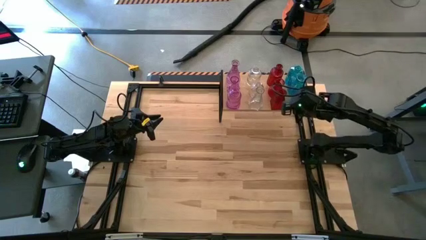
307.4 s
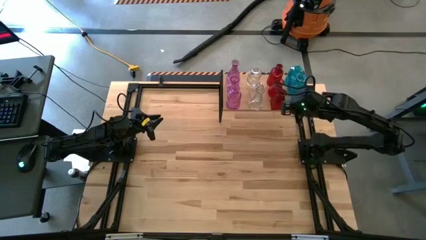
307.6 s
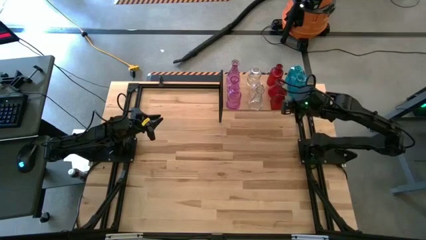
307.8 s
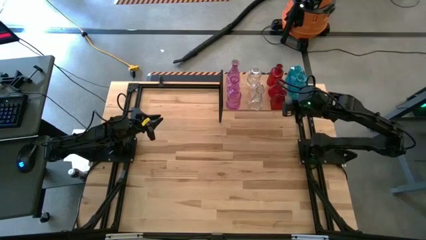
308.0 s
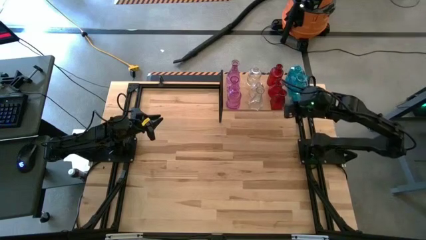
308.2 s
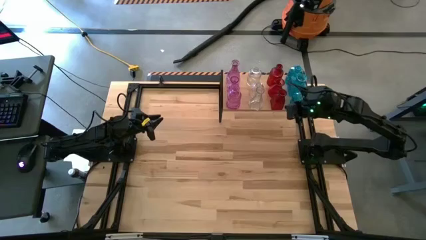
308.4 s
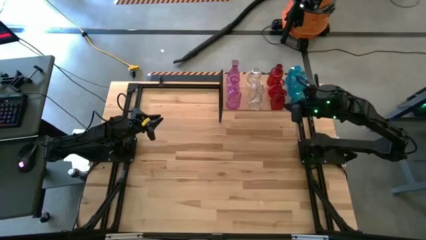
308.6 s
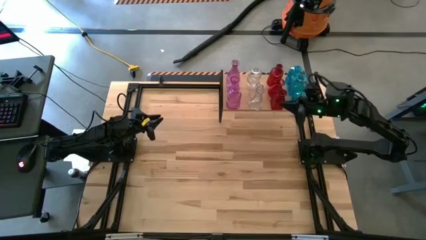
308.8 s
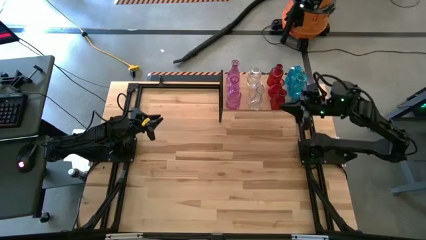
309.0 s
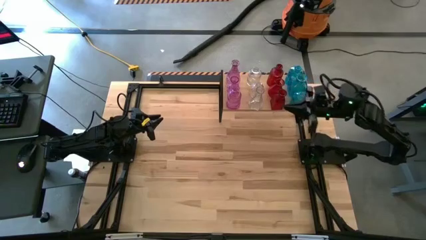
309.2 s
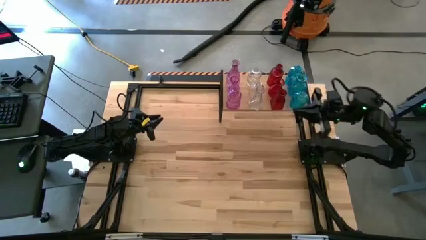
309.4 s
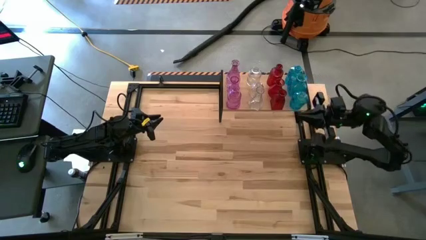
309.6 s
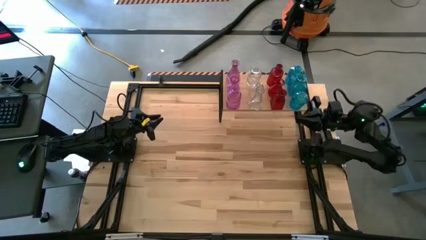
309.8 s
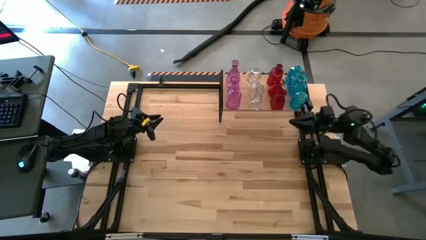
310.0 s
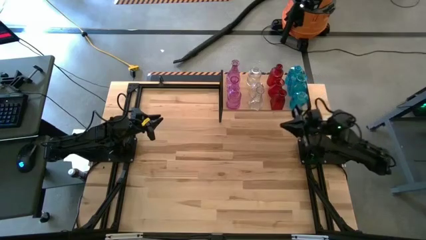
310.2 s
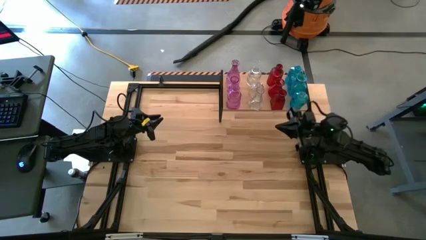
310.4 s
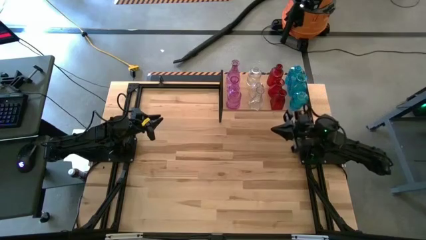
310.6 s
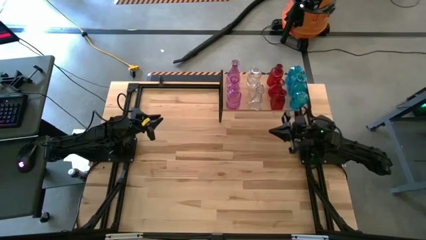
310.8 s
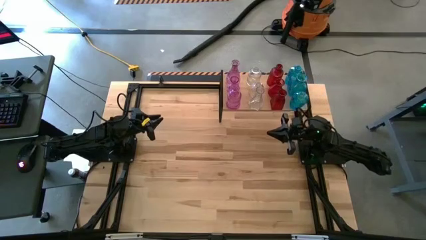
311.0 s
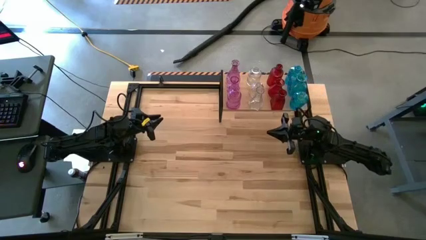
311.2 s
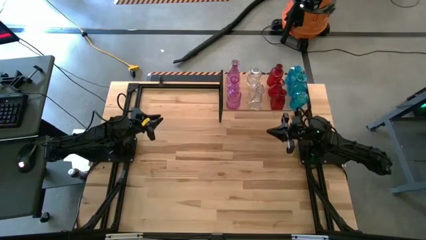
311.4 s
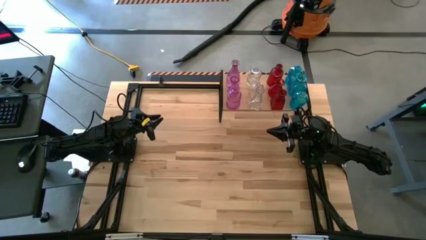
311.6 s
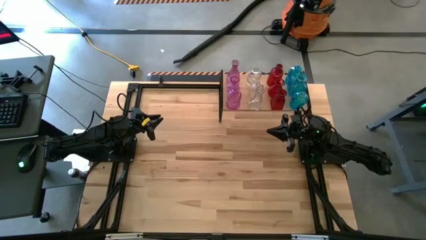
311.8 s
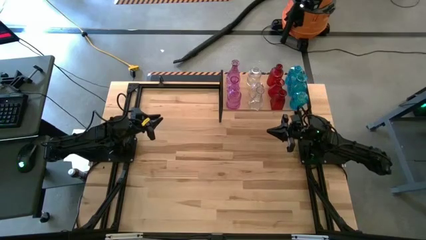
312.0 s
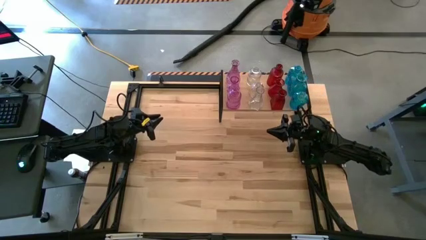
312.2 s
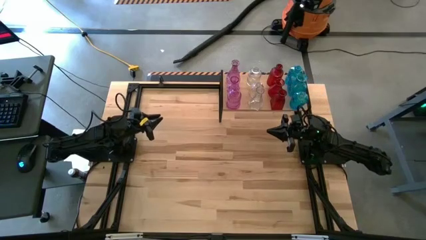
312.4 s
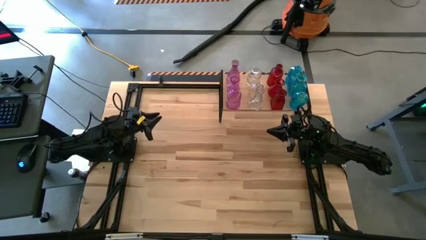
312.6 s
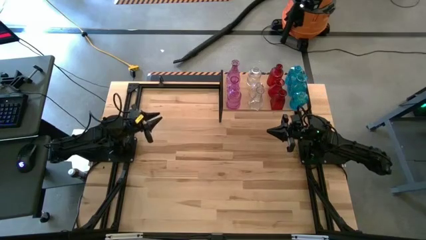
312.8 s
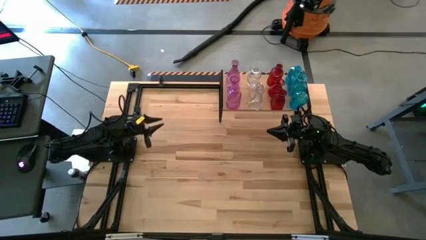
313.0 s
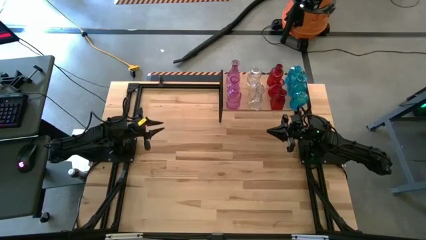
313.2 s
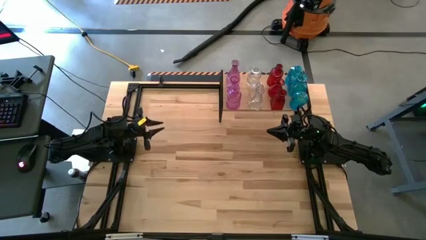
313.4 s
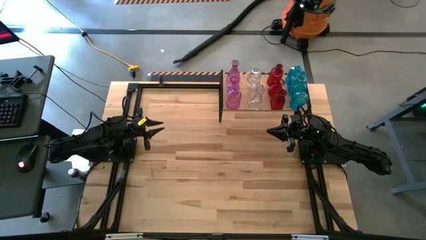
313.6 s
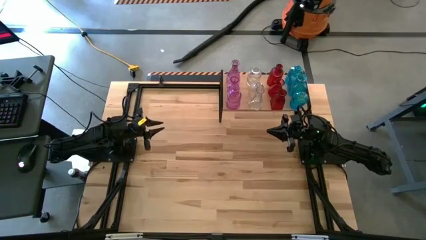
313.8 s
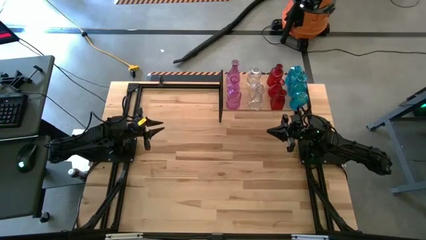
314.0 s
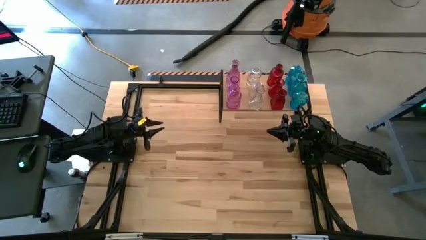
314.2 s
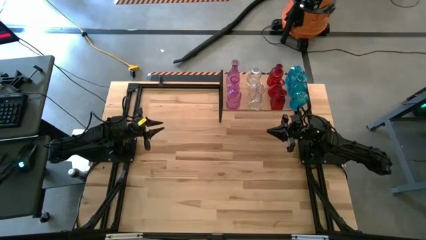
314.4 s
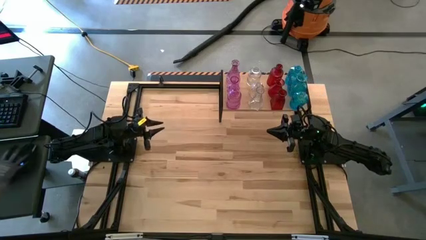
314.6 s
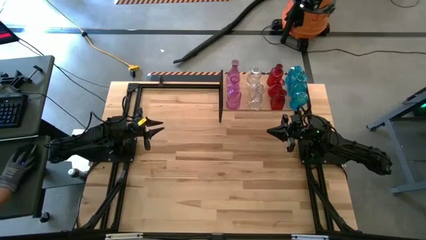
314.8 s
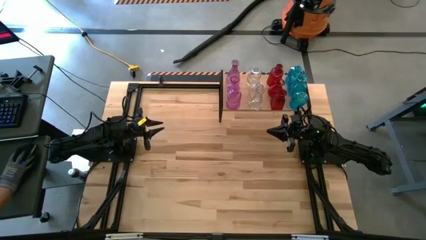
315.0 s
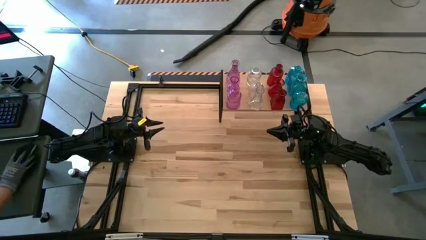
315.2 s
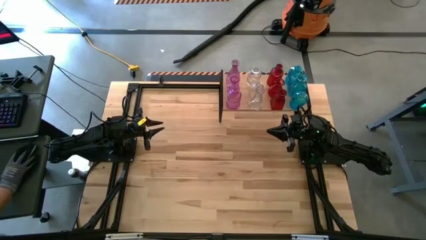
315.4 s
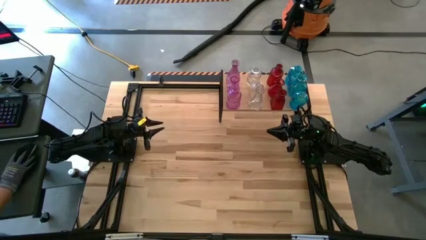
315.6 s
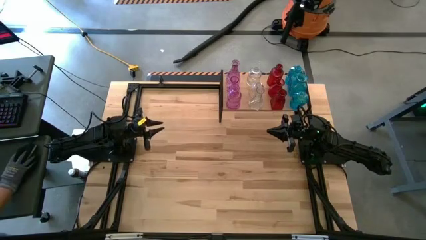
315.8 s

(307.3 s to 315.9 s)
Task: sort vases onto shelf
Return to Home Position

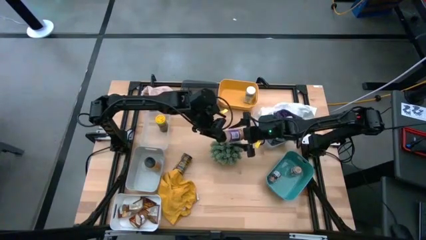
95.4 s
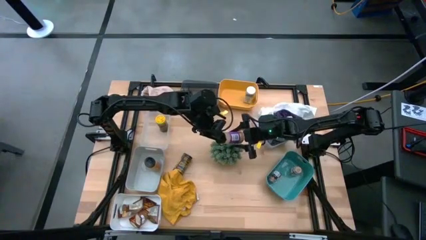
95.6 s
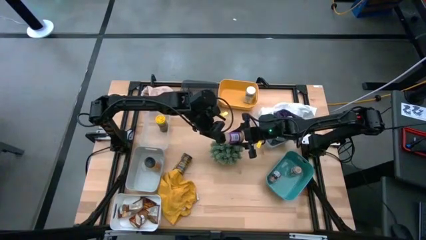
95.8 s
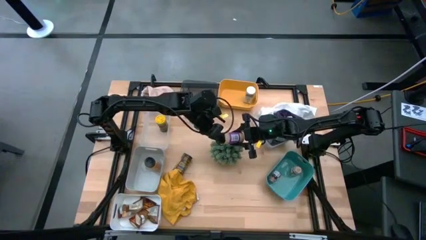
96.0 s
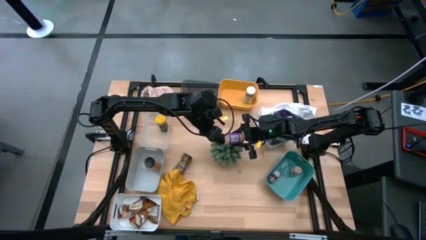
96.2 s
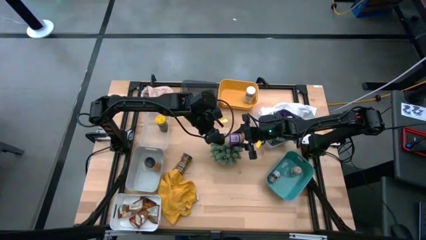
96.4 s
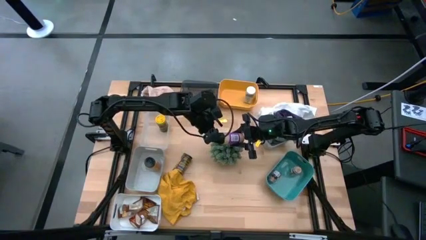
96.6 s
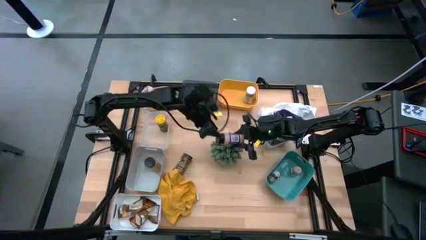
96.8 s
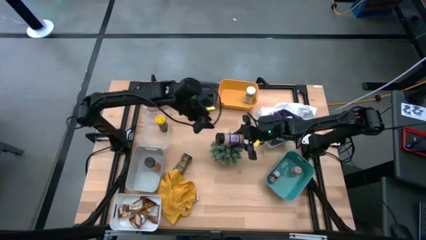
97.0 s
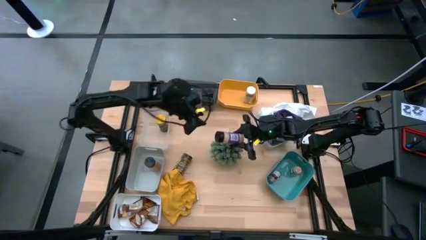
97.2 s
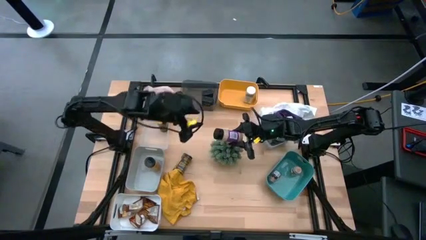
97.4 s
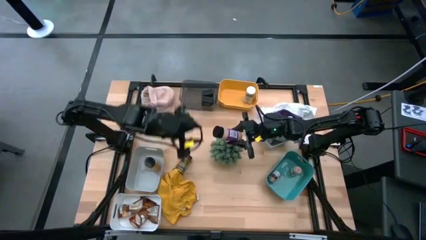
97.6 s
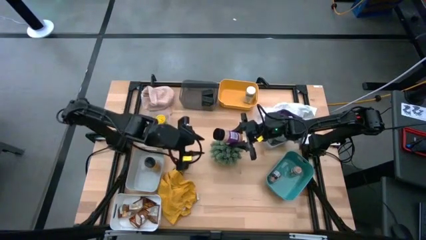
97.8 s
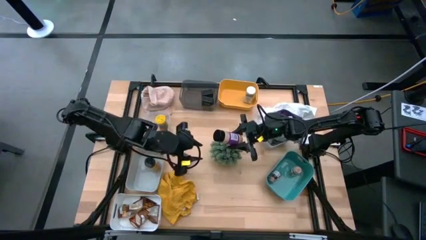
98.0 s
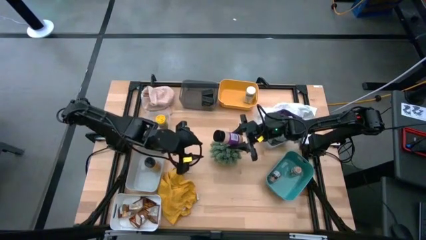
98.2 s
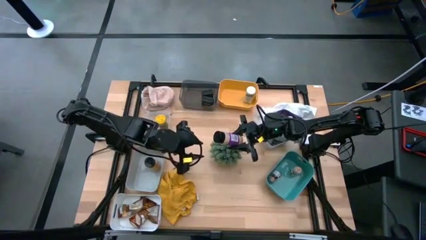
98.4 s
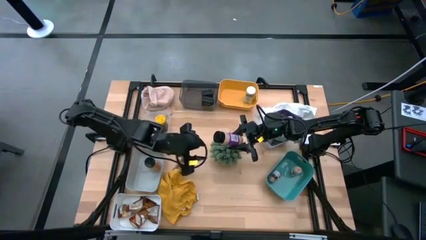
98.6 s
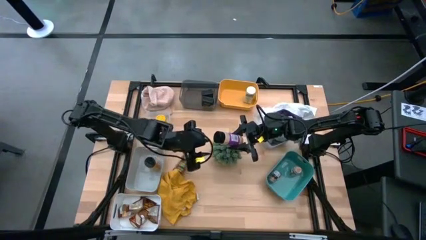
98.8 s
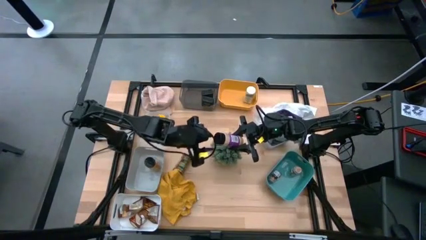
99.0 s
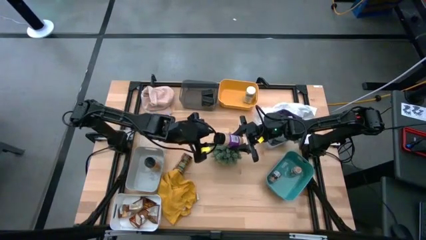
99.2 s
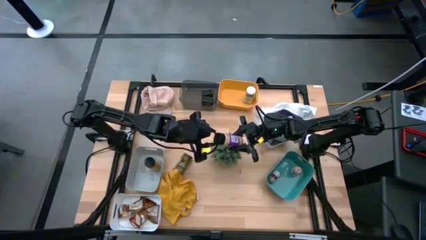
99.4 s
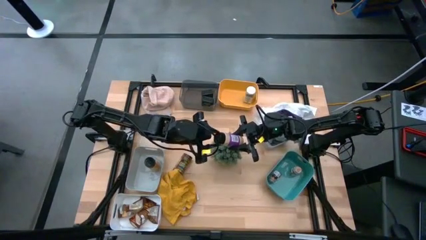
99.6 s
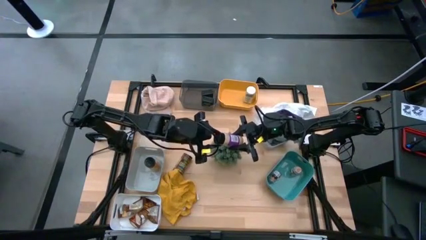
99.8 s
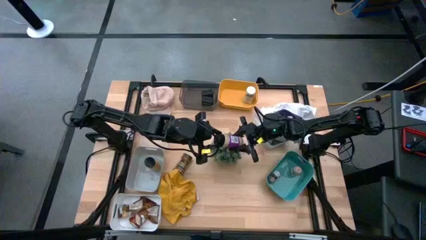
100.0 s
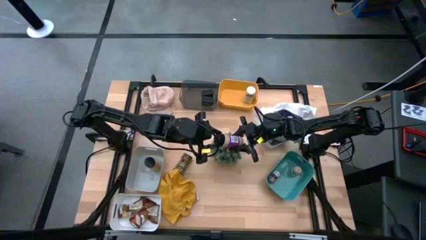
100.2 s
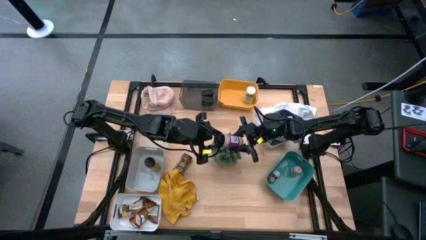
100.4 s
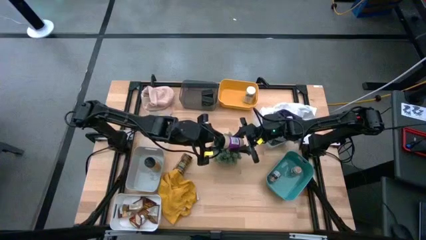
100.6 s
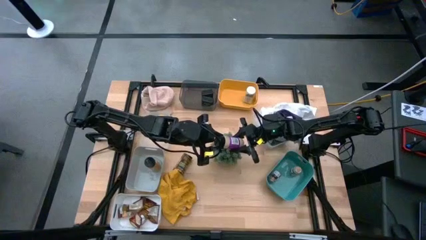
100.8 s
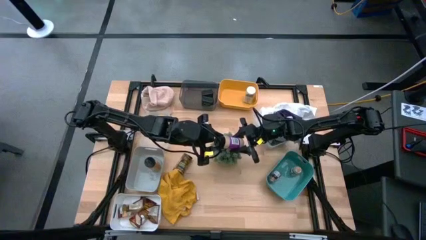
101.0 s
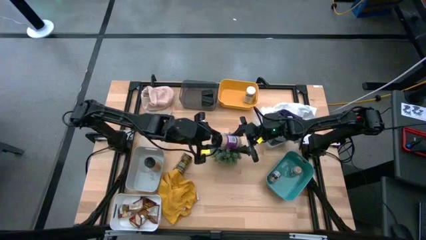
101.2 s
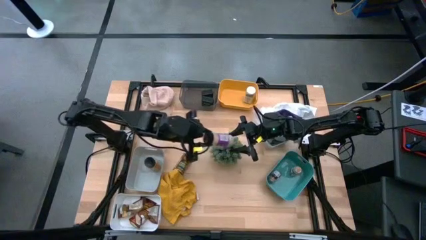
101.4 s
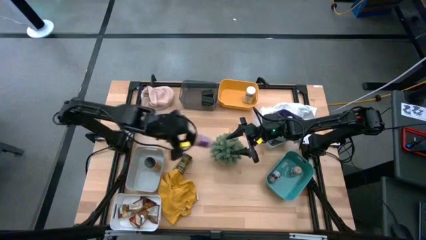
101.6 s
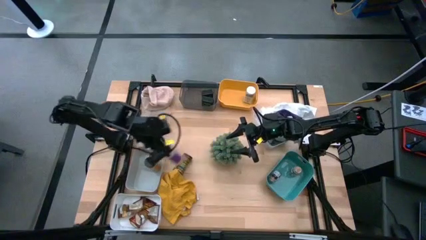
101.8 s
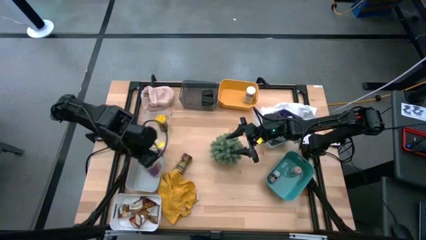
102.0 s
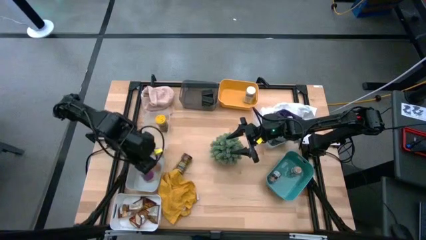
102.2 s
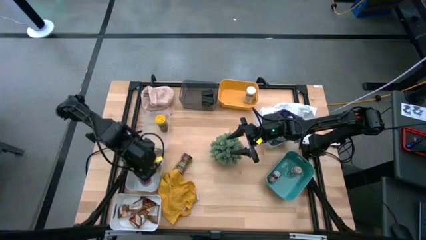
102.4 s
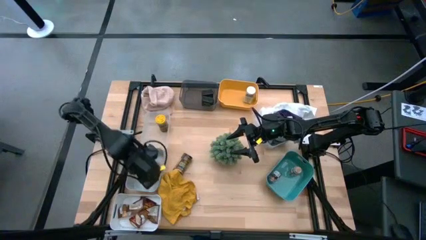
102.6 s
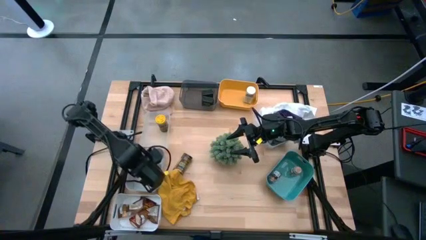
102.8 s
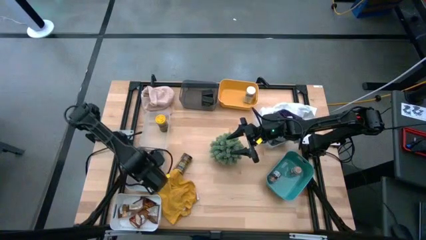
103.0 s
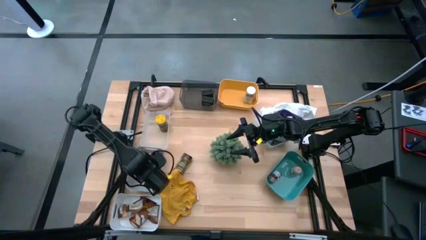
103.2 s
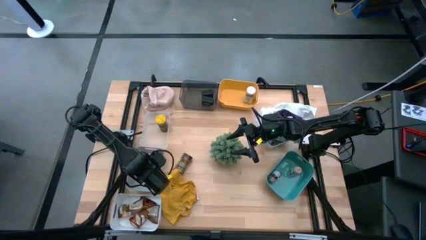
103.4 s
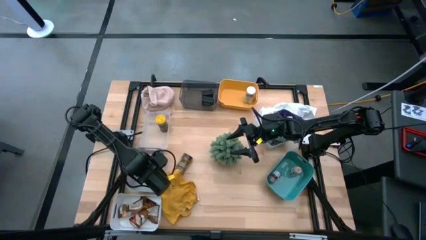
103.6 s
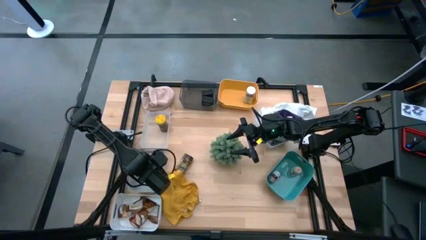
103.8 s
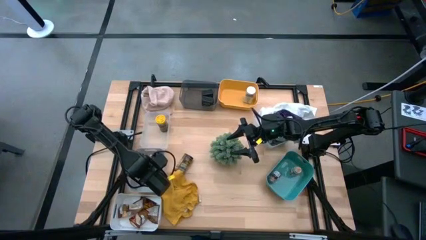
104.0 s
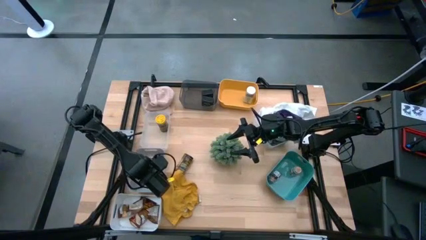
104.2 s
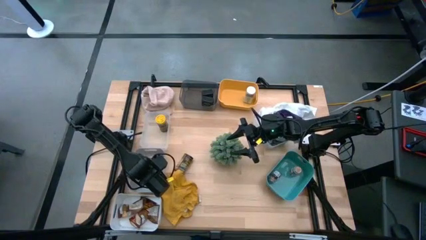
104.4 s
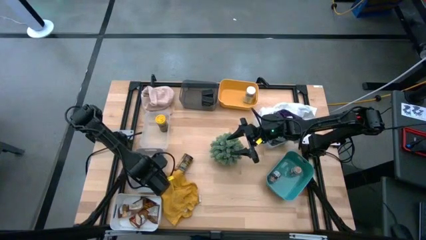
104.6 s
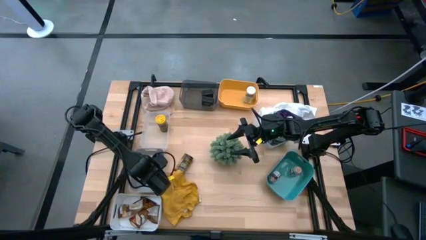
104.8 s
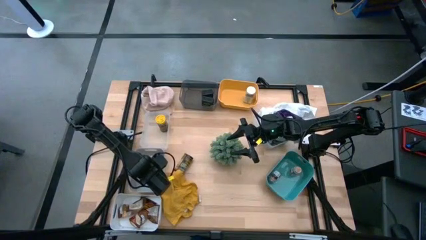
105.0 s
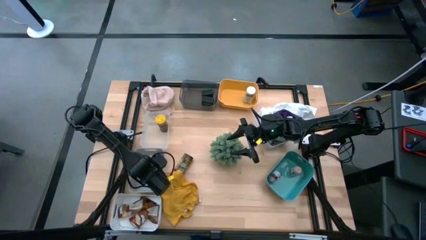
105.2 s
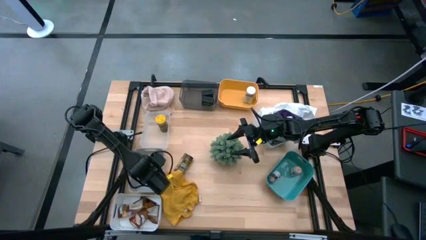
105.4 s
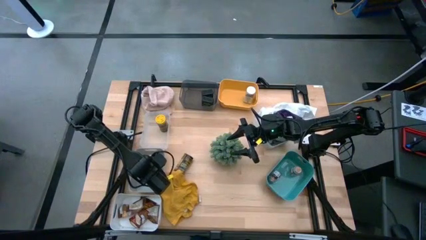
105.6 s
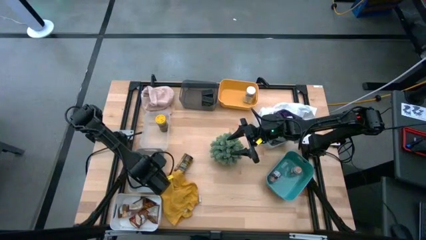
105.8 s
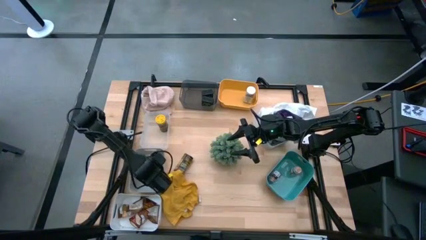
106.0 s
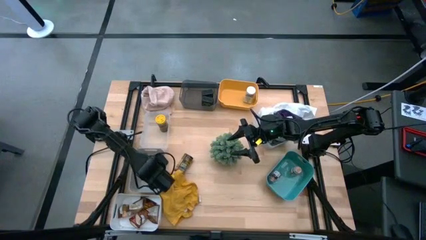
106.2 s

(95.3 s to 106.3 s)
Task: Sort spices by type
Put the black spice bottle into the top white bin
